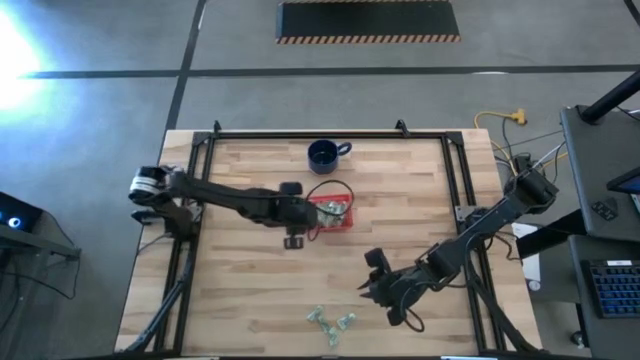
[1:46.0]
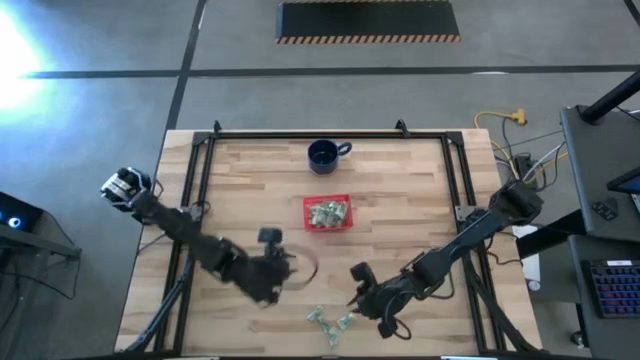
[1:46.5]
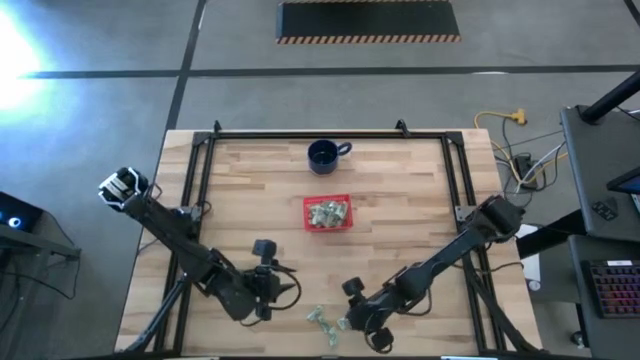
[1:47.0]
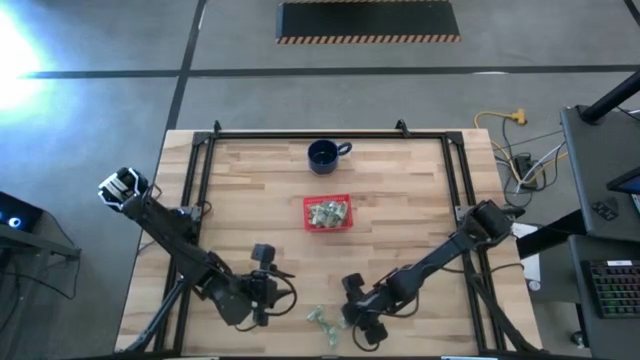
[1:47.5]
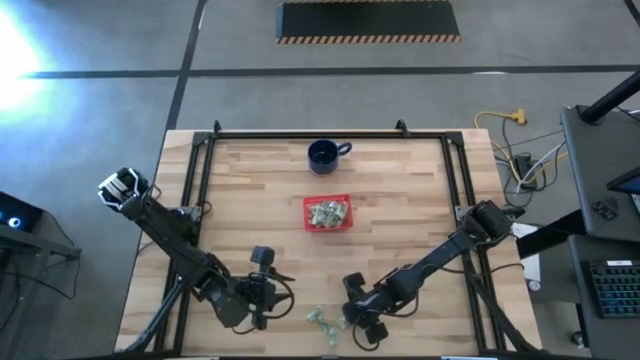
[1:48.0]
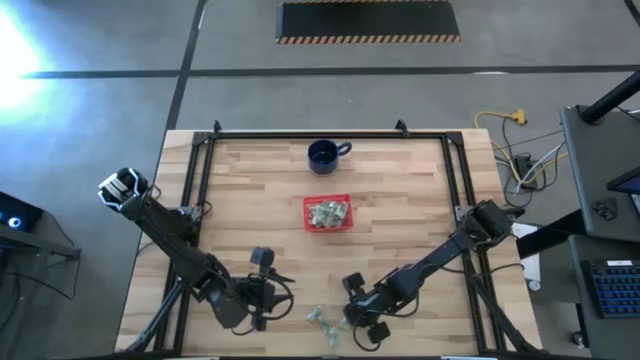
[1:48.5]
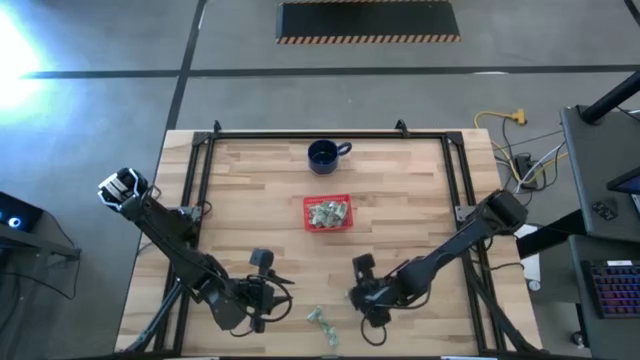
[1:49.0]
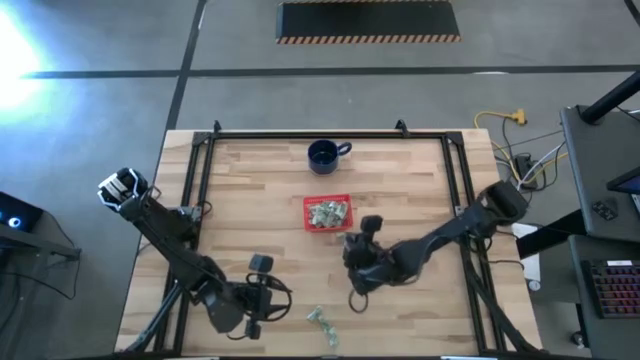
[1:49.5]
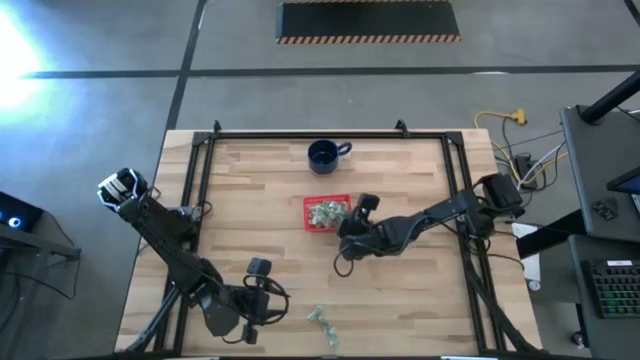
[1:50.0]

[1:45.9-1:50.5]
Task: Pick and place items into bin
Put the stevia packet into the red bin

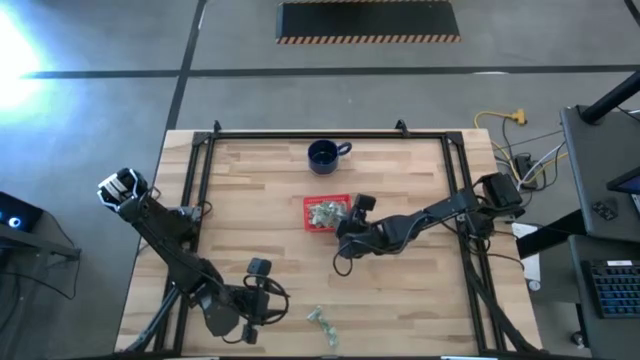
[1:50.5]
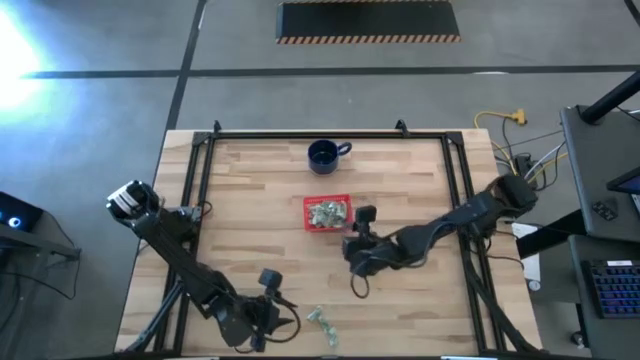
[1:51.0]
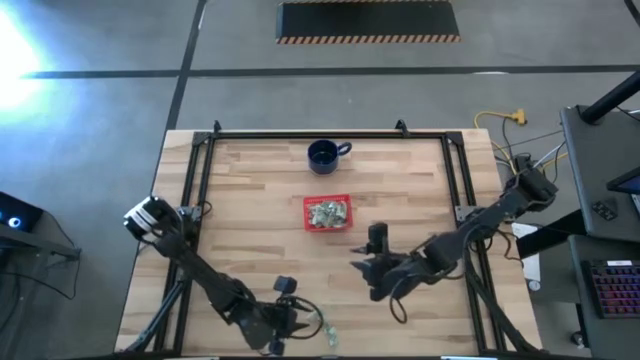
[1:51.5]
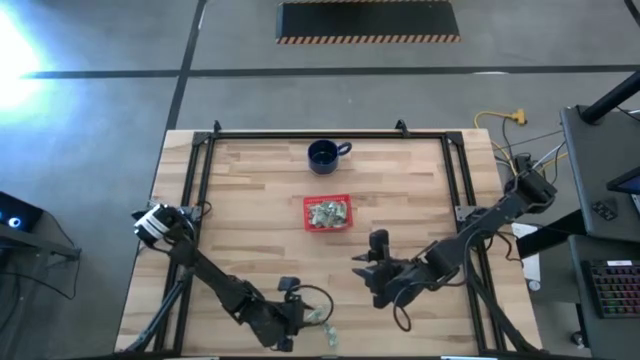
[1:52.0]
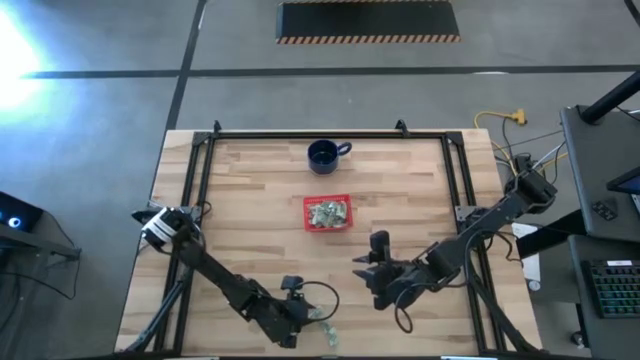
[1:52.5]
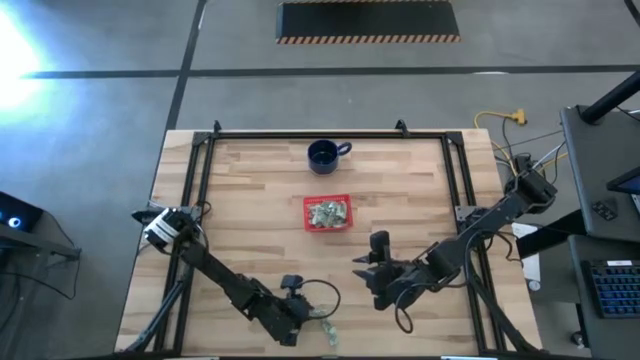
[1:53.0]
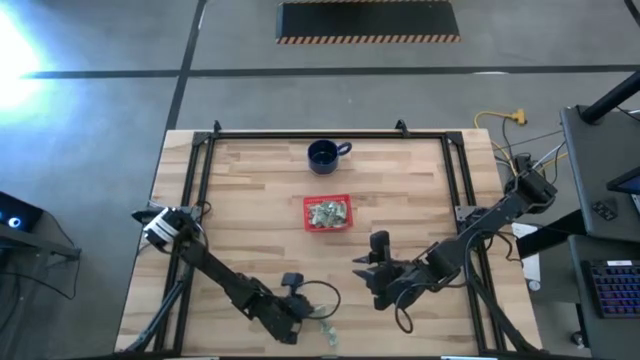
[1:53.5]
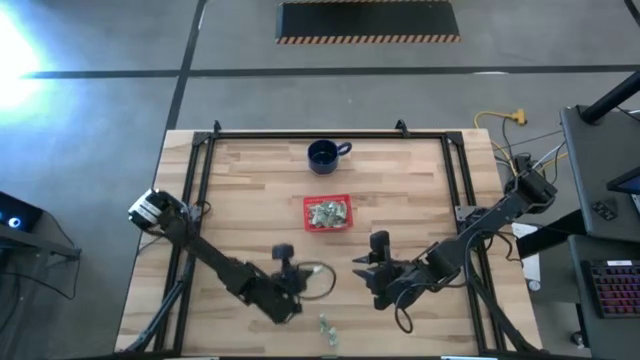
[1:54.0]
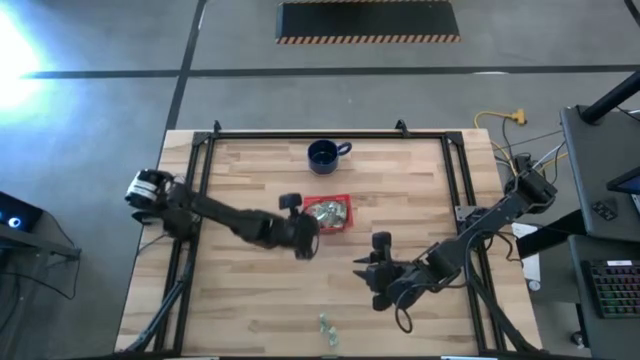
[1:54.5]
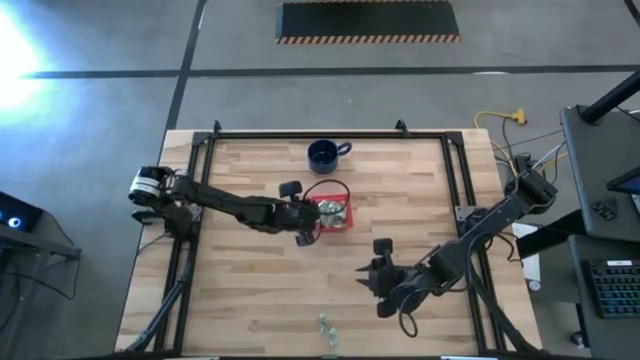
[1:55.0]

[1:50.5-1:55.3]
Put the stevia packet into the red bin

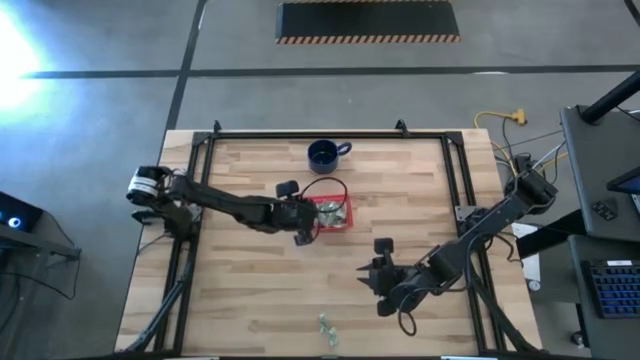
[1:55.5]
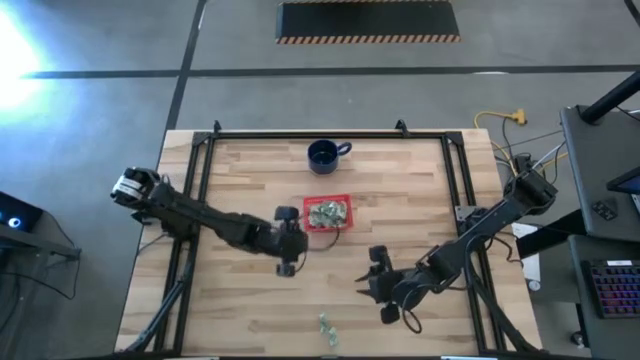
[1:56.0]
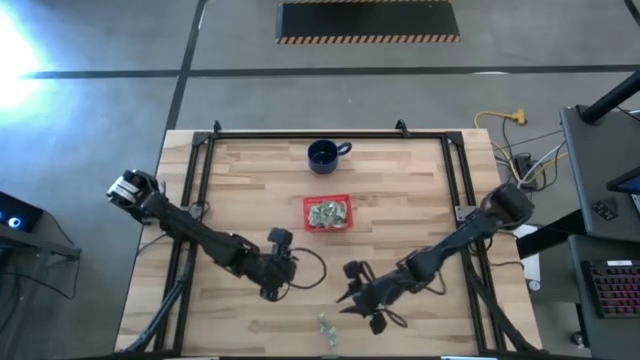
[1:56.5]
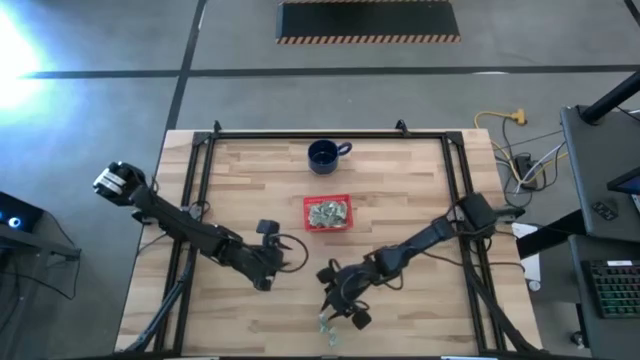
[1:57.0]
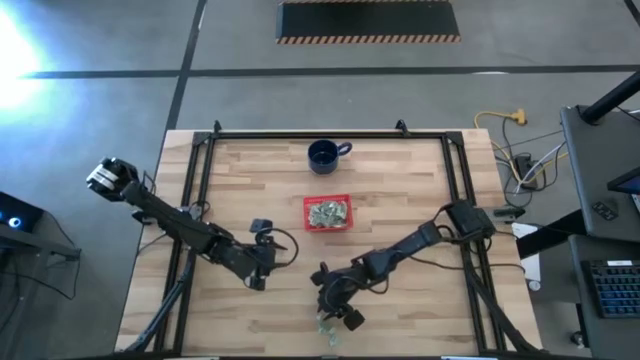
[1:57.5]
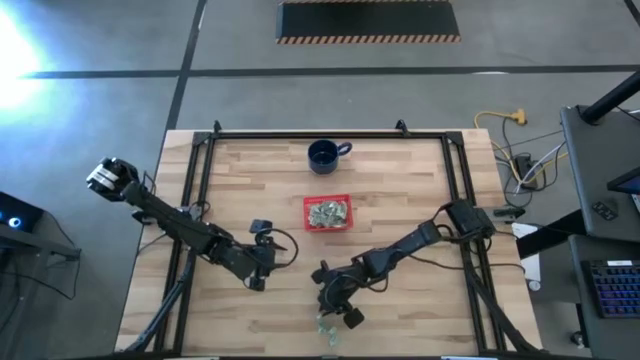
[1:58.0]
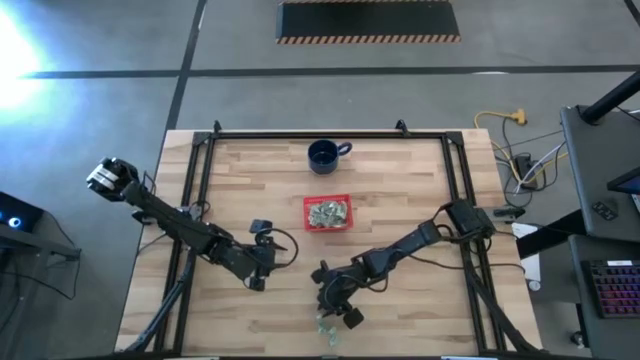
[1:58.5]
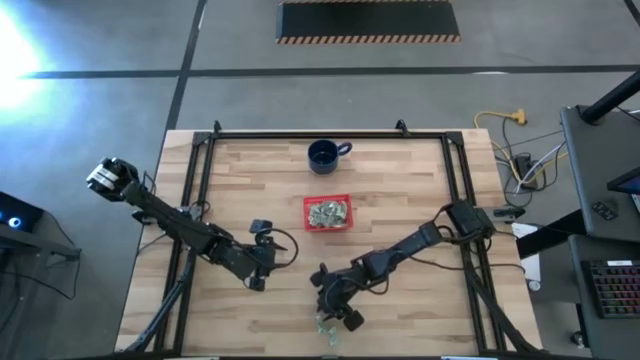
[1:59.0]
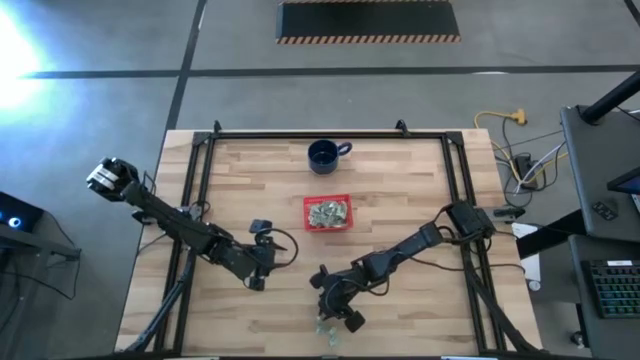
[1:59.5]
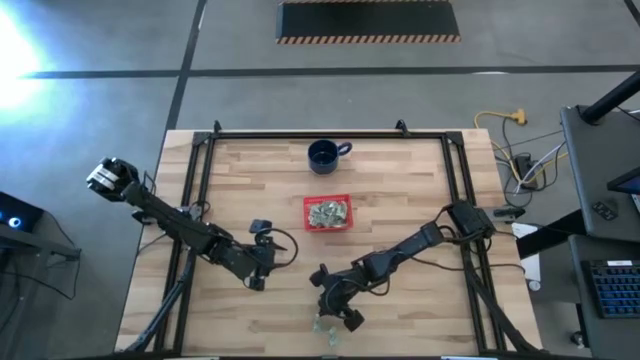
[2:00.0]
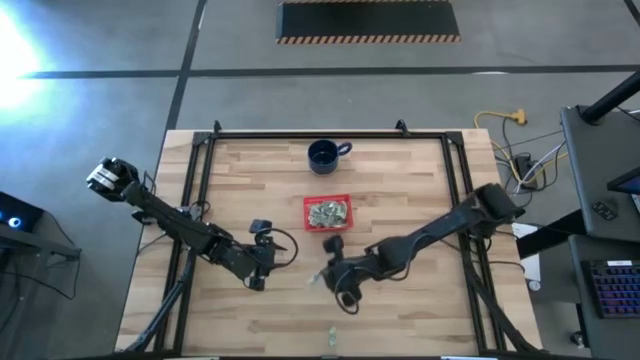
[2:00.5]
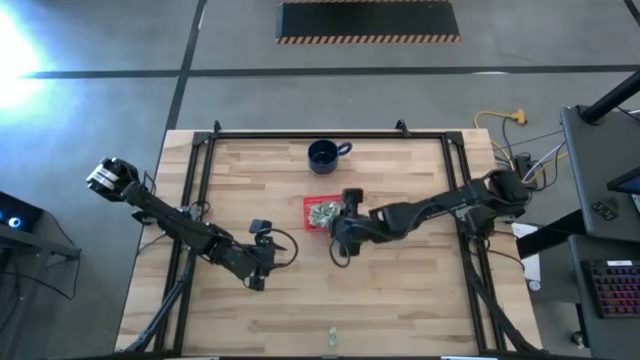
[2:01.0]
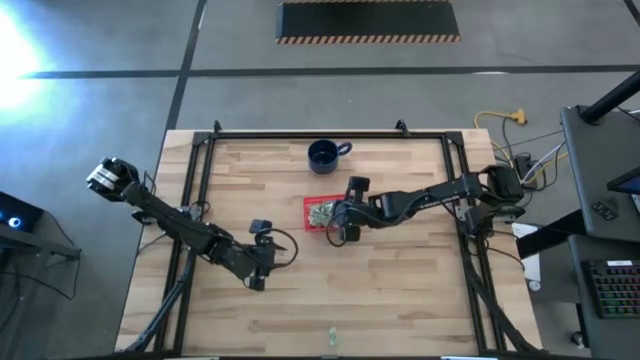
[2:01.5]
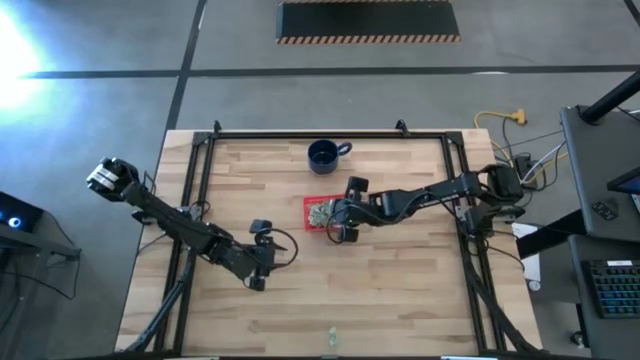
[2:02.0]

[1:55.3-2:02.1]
Put the stevia packet into the red bin

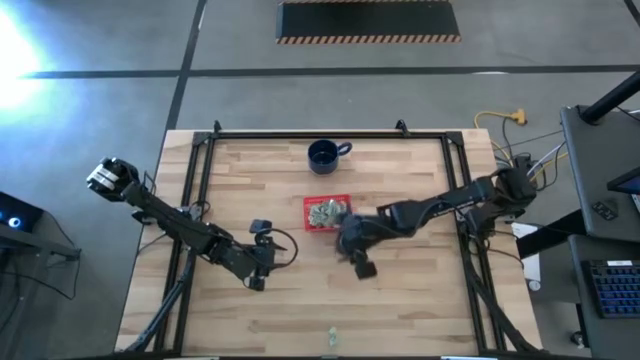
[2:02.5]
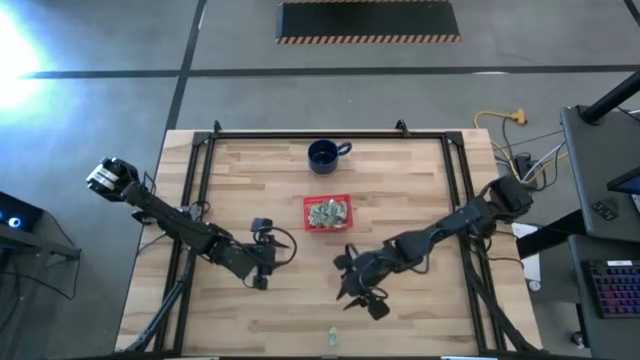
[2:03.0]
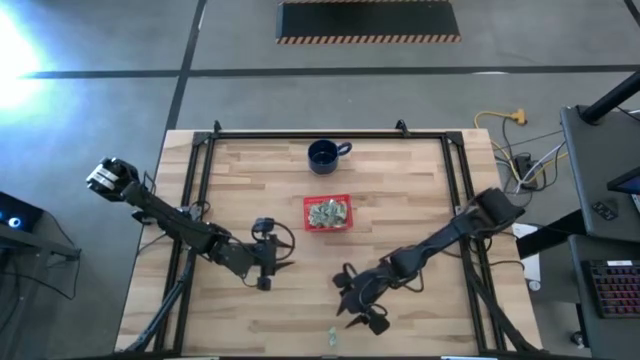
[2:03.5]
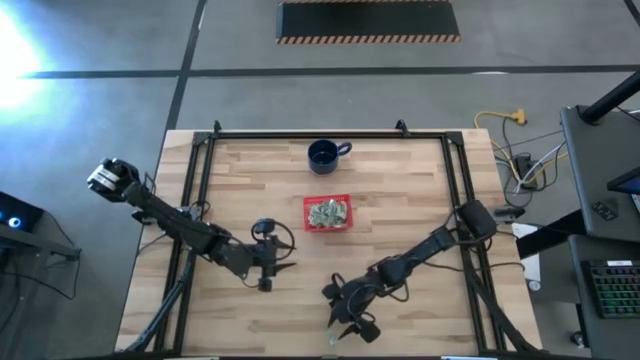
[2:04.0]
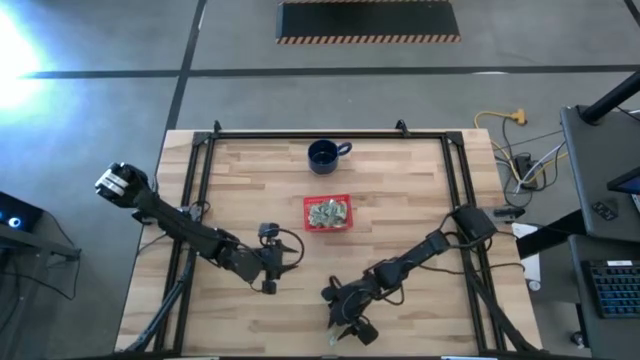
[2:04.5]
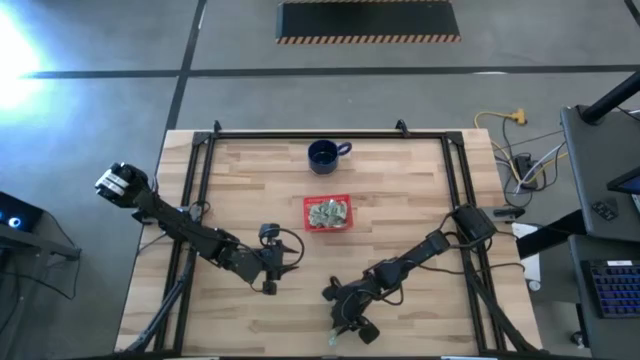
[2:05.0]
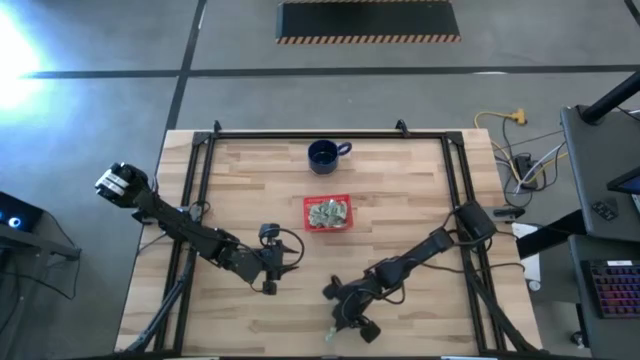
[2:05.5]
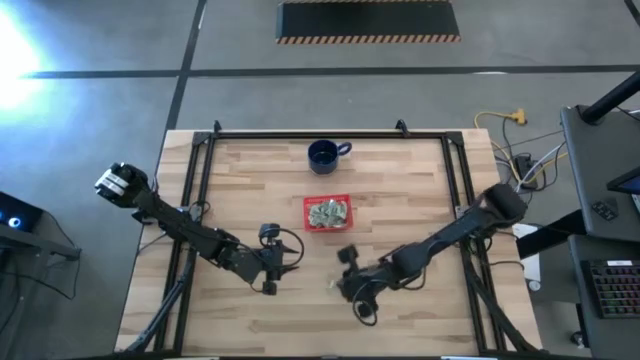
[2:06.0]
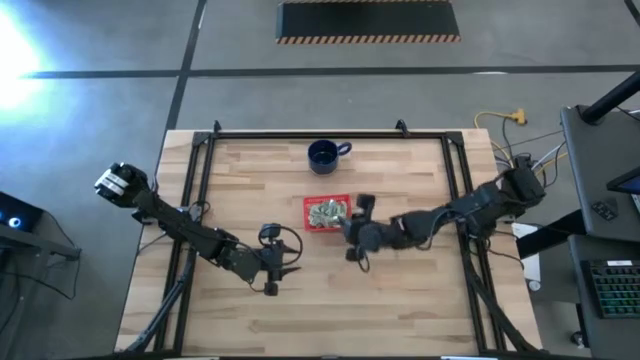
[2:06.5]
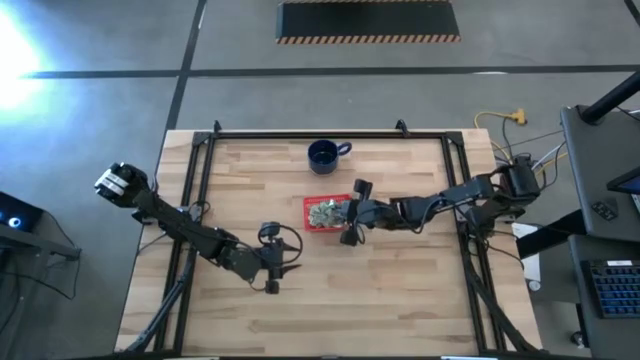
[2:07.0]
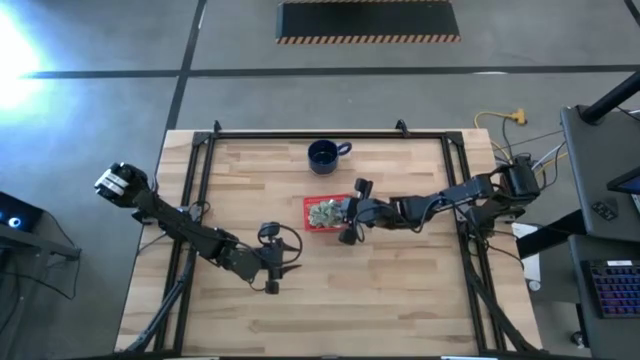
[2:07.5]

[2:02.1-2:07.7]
Put the stevia packet into the red bin
